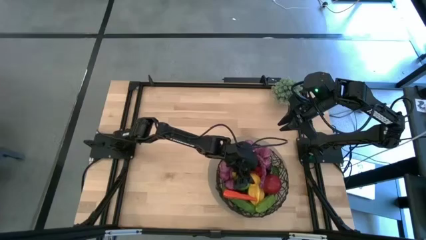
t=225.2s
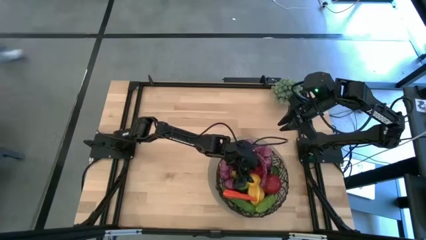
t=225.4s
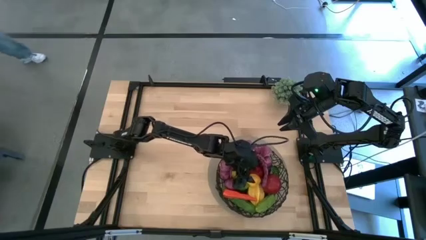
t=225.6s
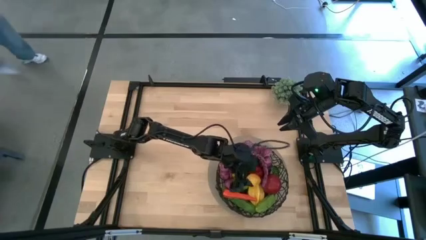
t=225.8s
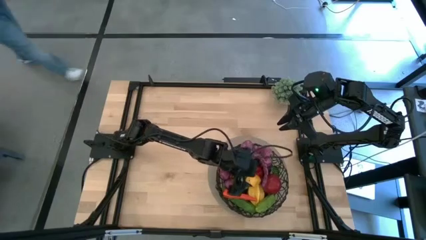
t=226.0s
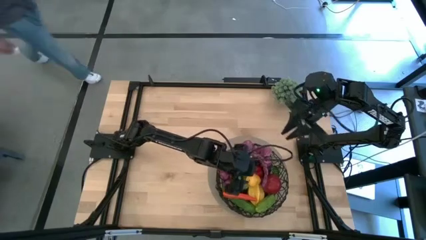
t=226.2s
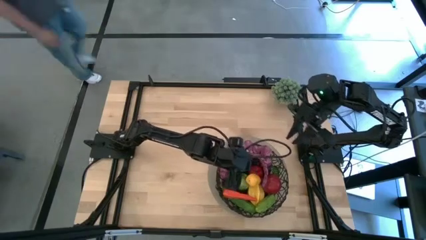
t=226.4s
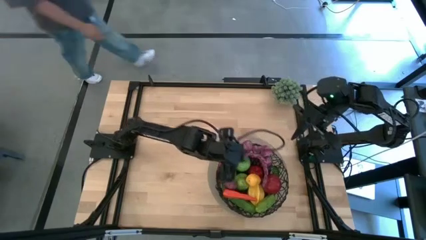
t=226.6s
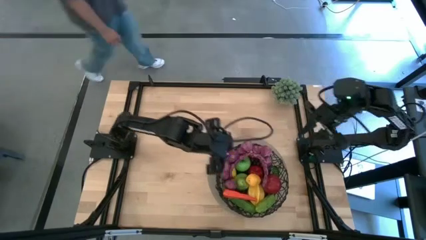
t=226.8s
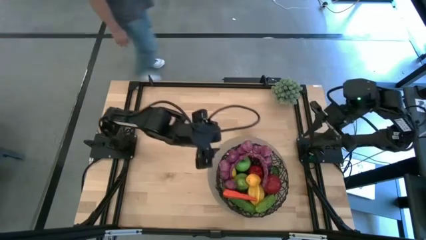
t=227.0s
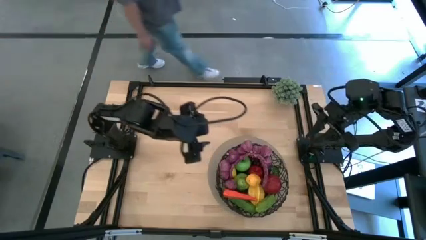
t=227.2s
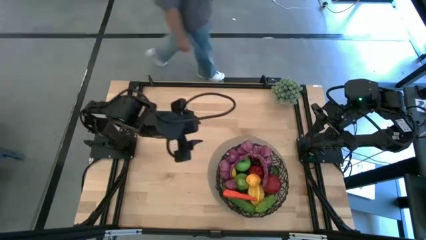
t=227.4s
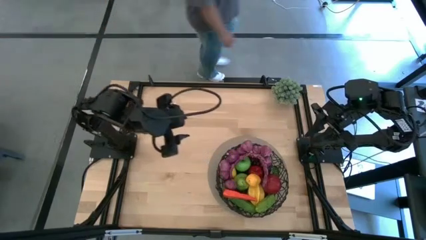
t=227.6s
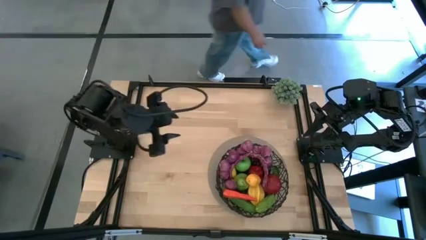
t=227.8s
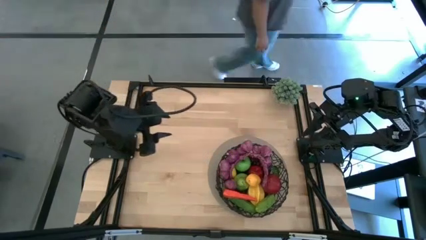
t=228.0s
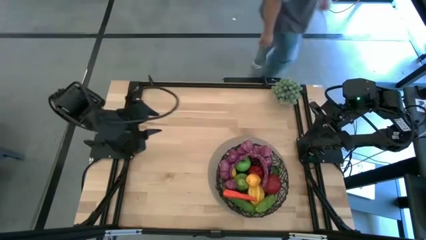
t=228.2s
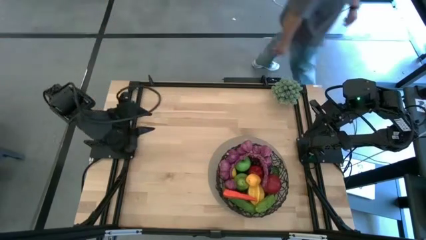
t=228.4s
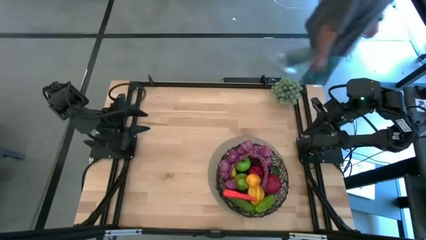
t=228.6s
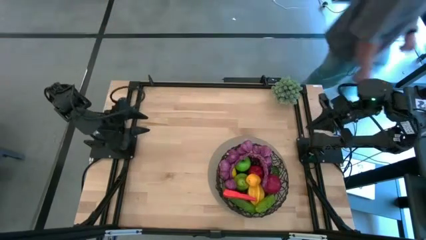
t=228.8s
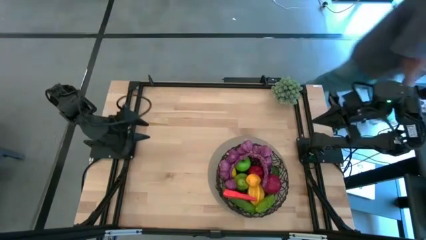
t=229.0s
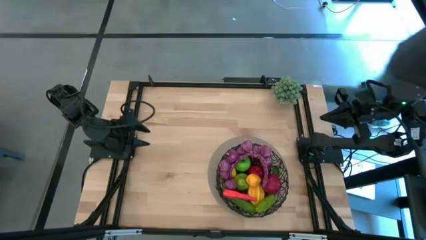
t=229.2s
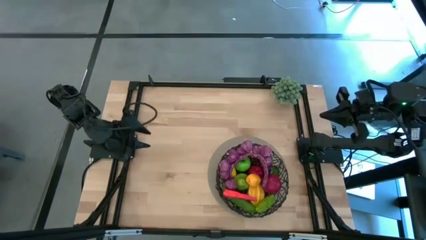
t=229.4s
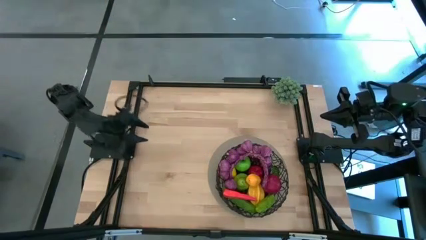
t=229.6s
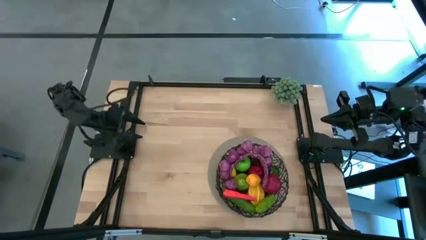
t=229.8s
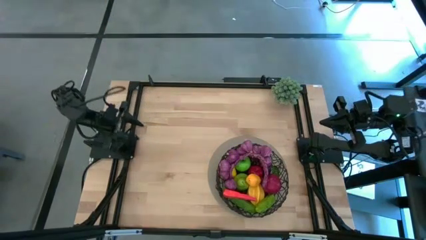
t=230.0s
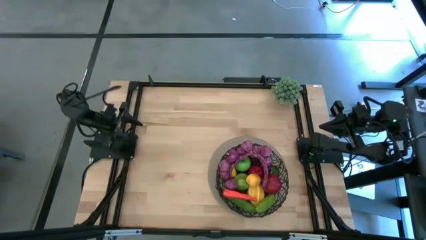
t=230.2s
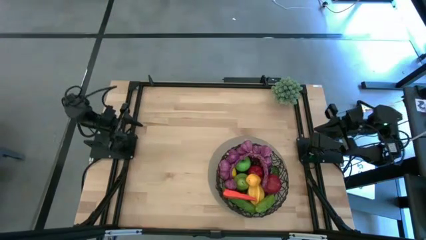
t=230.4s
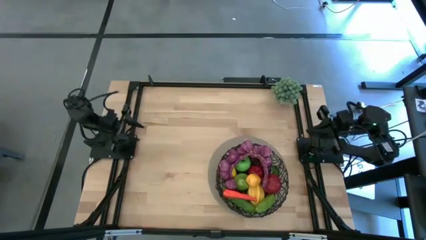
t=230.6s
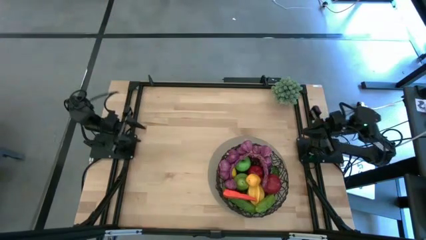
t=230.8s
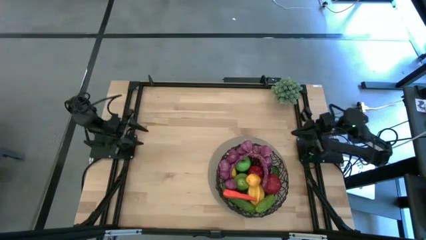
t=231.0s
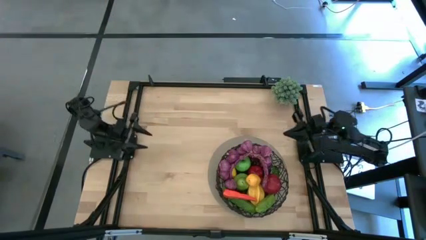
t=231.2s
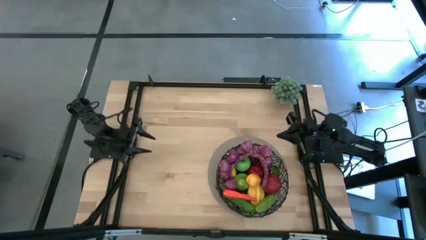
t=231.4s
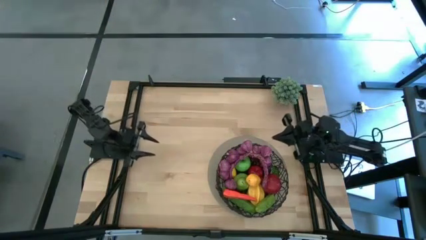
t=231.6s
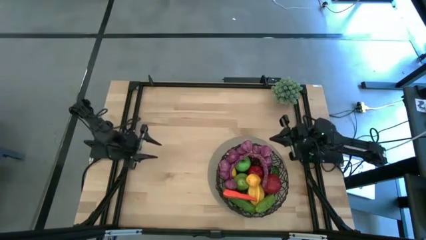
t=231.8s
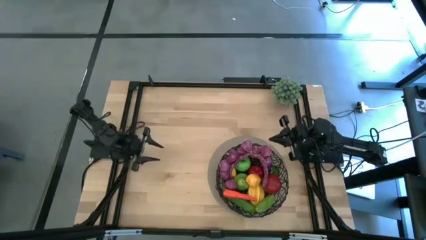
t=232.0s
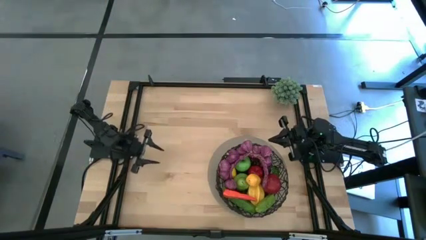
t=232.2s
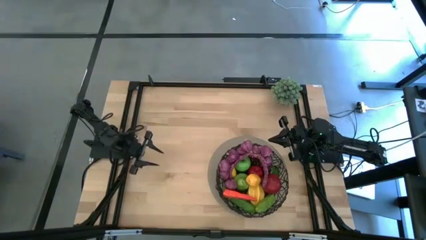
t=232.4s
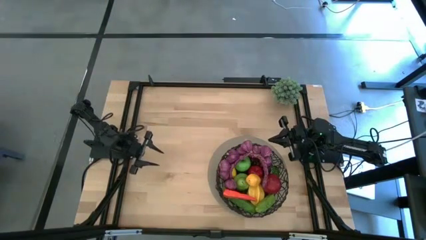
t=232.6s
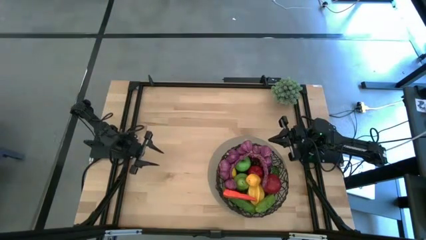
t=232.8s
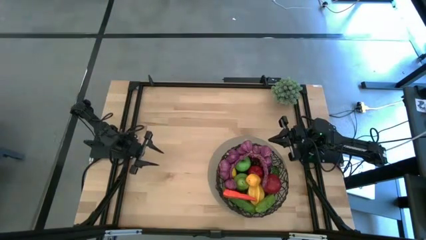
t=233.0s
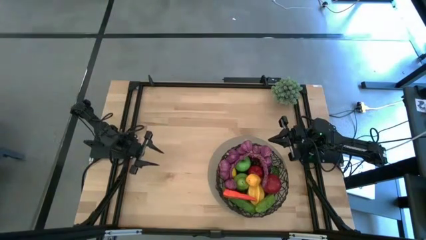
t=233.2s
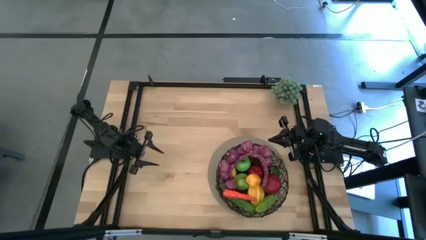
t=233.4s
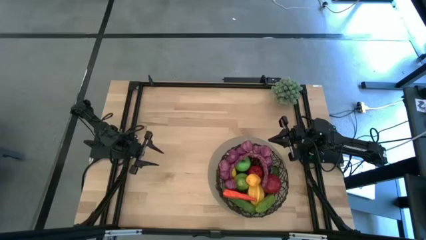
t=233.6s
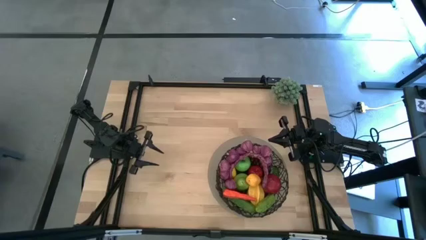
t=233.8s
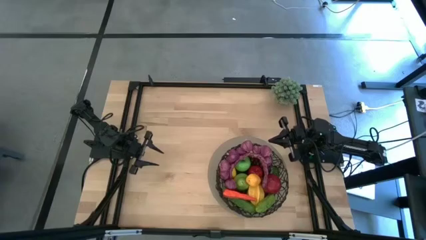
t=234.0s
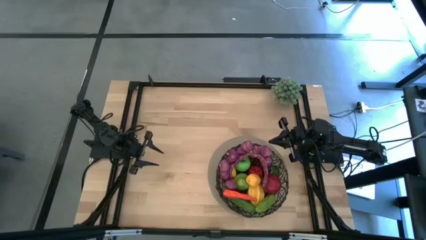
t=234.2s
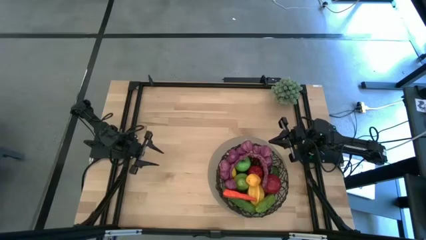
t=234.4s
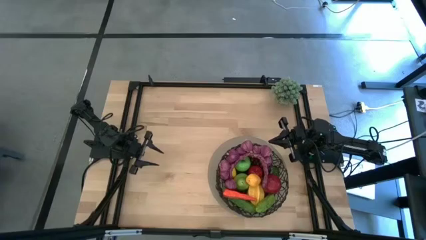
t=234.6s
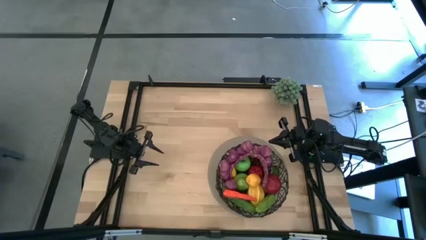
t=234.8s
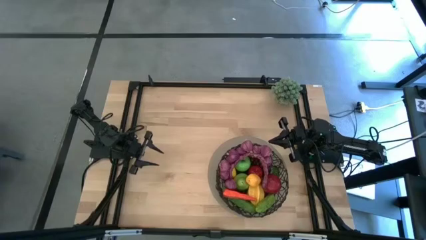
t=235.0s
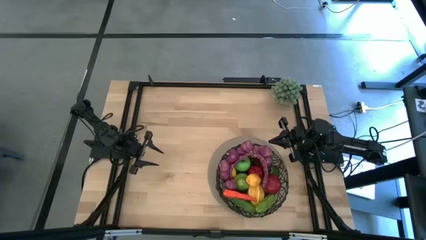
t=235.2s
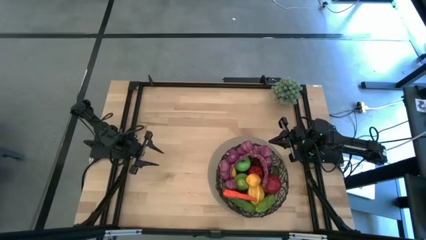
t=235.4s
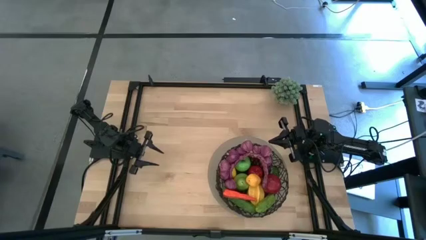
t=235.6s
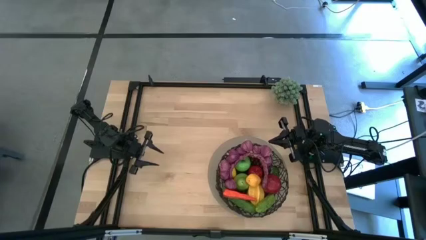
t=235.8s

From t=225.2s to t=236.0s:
Task: Build produce basket
Return to Home Position

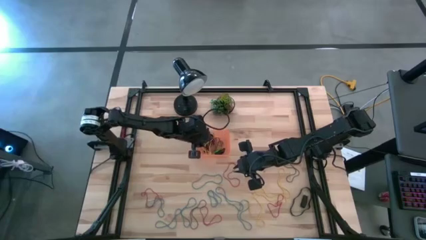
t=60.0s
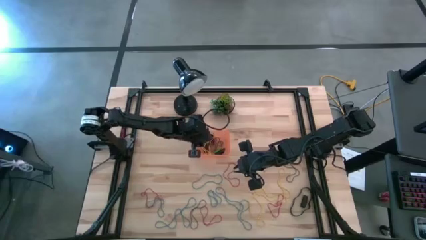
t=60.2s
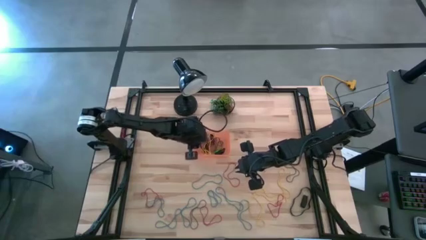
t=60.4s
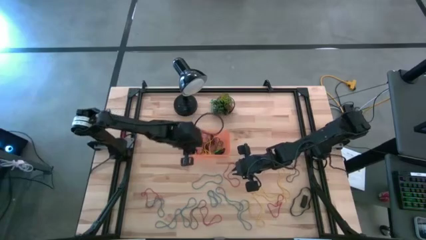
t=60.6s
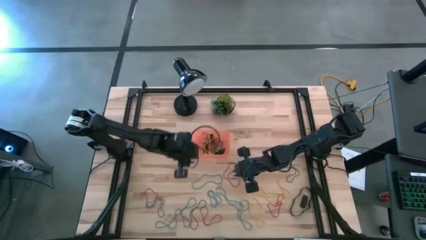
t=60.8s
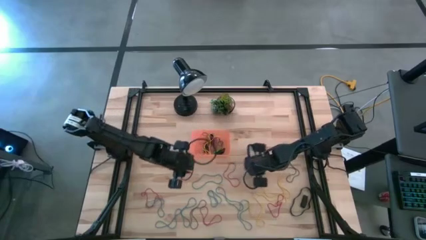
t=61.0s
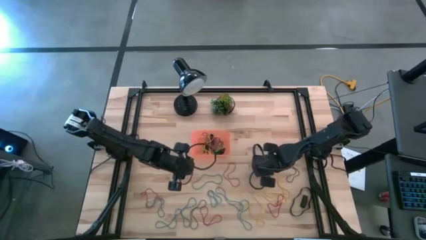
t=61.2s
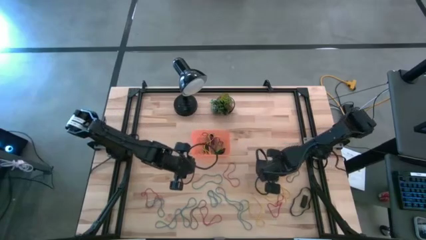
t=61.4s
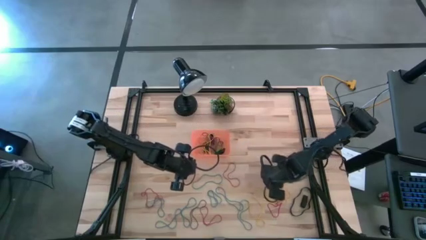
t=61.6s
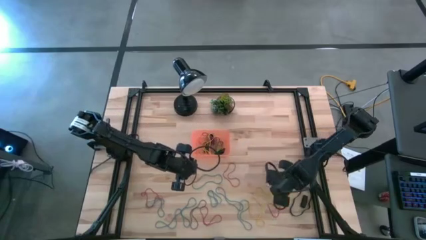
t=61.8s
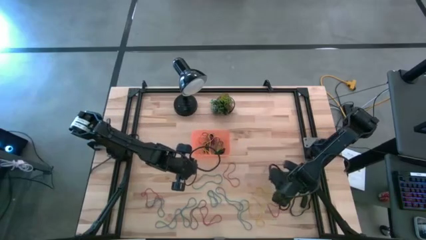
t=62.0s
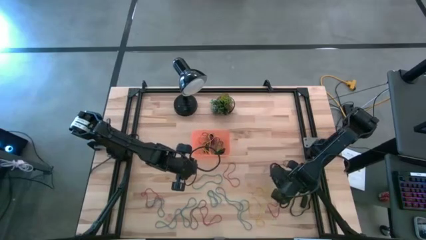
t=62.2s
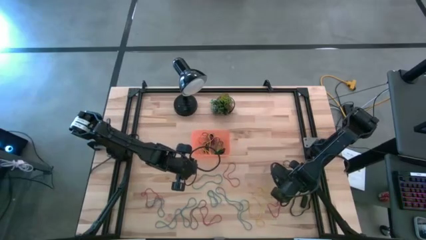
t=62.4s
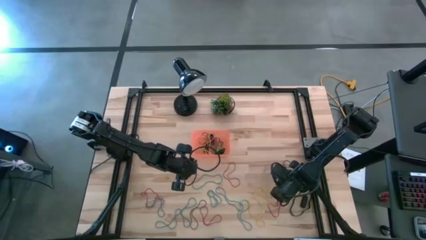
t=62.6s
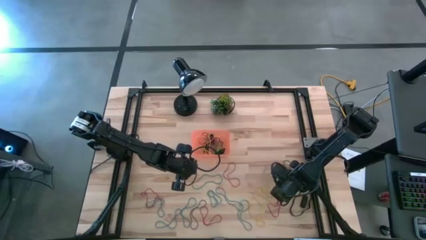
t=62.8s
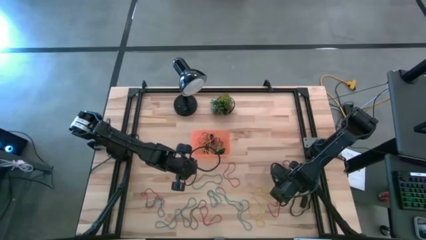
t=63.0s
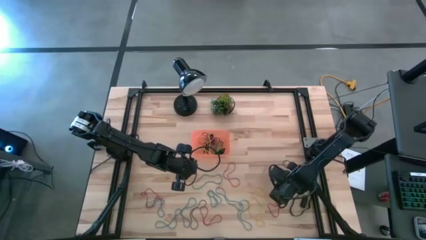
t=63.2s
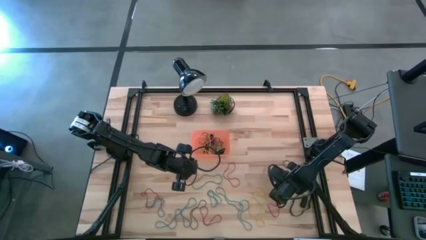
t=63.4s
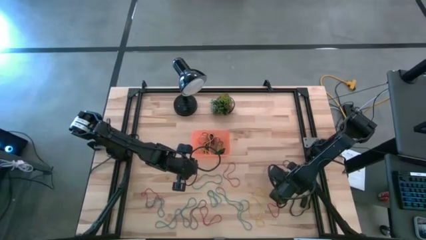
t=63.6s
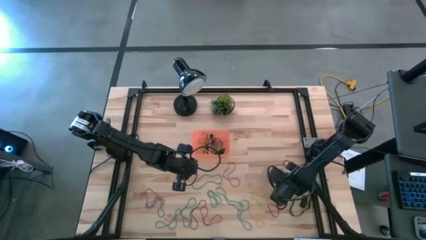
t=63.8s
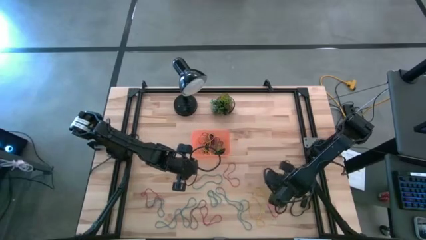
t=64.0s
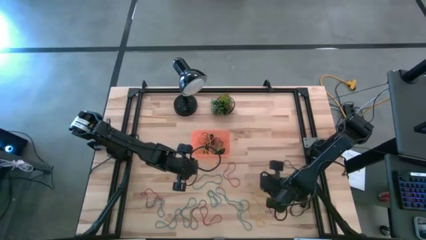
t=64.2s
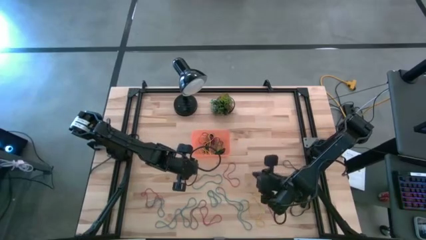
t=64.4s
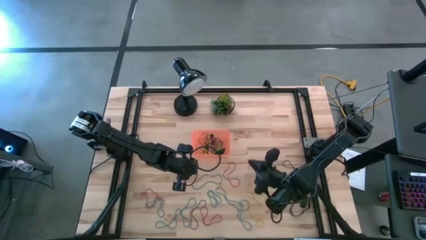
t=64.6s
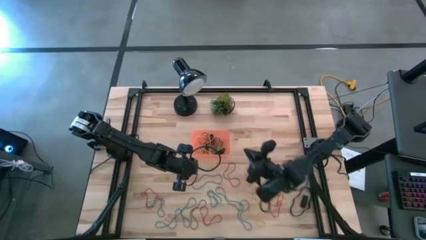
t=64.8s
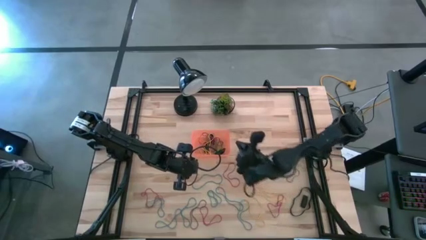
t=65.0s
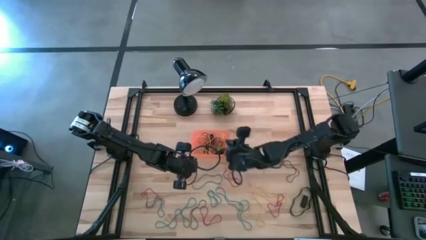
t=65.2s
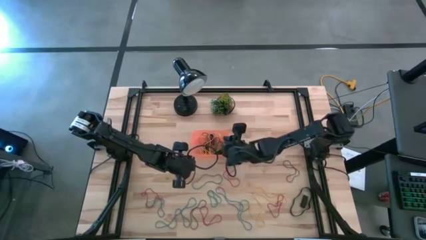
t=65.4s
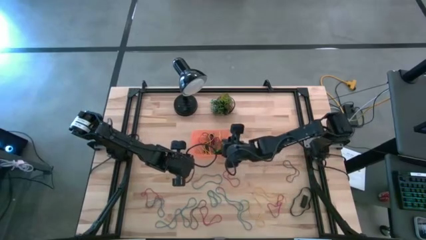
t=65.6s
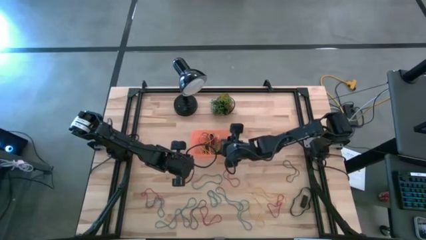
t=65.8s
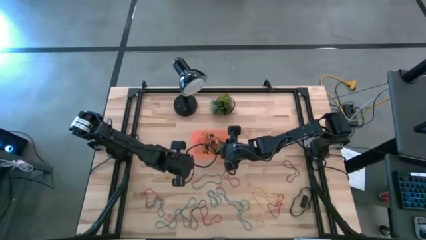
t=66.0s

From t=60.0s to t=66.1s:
Task: Pick and place rubber bands into bin
Put the yellow rubberband into the orange bin
